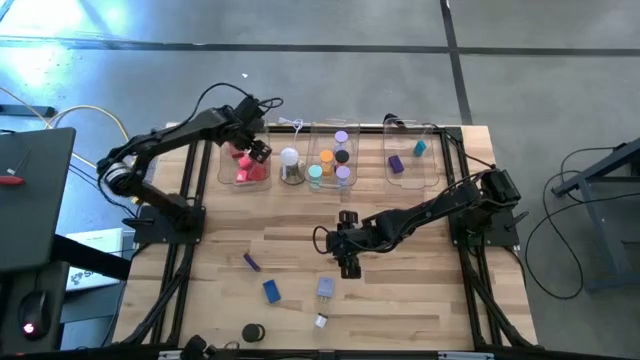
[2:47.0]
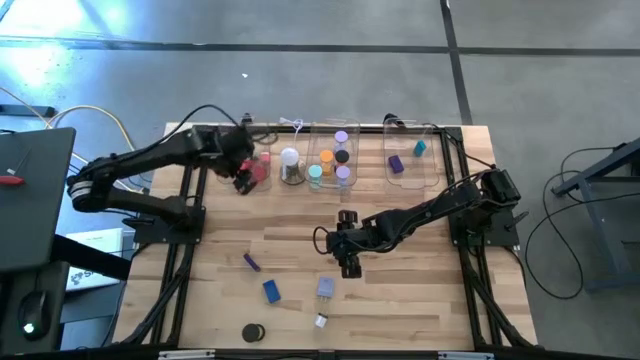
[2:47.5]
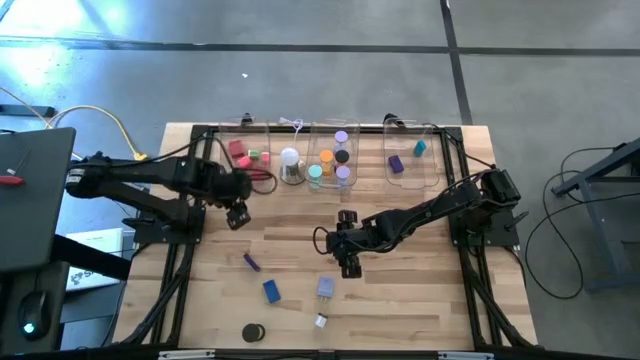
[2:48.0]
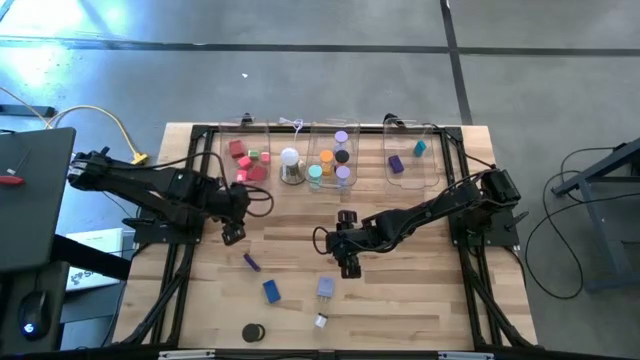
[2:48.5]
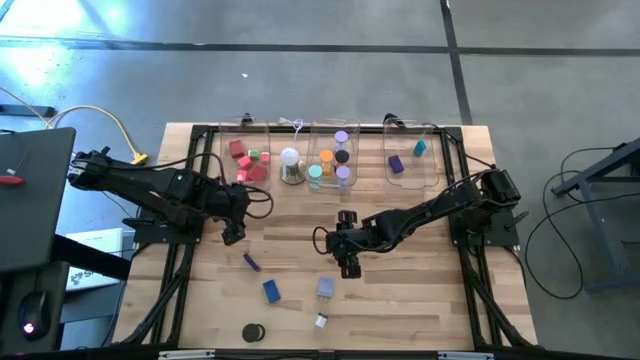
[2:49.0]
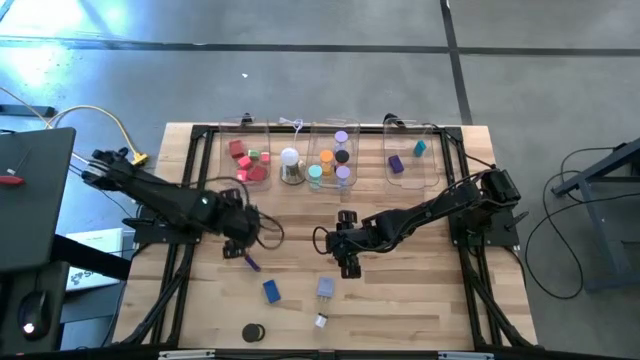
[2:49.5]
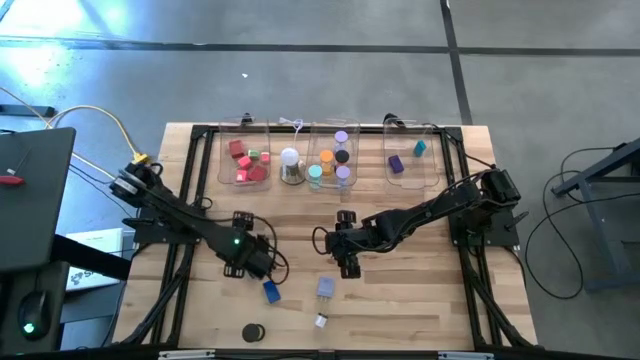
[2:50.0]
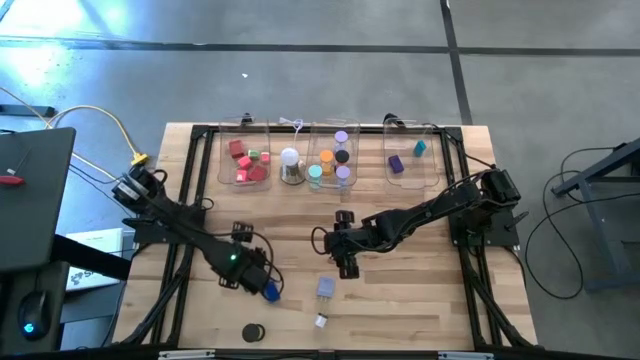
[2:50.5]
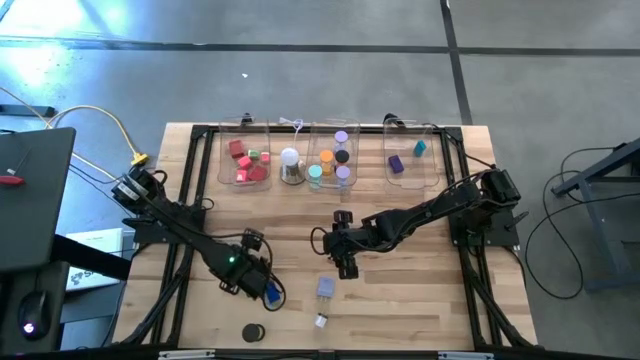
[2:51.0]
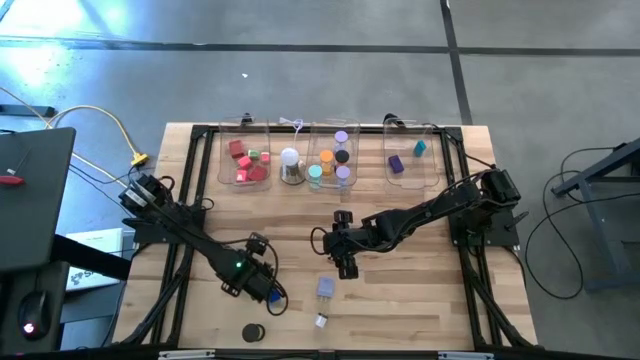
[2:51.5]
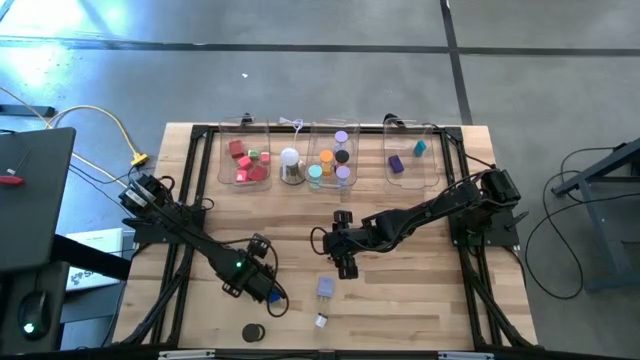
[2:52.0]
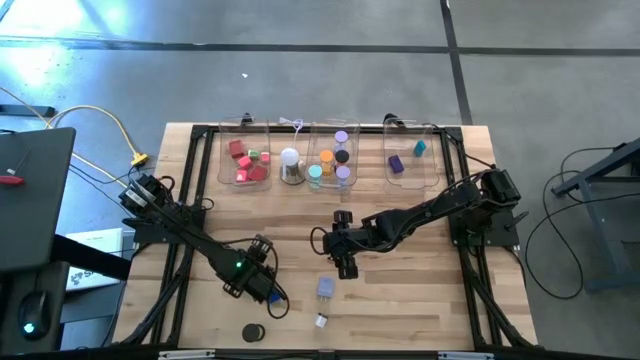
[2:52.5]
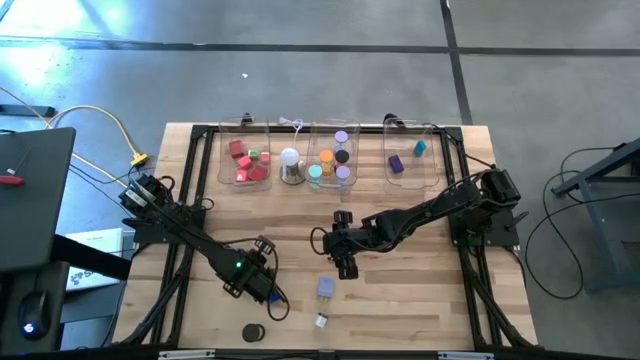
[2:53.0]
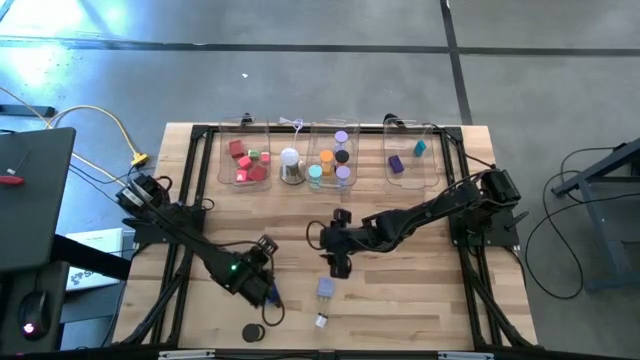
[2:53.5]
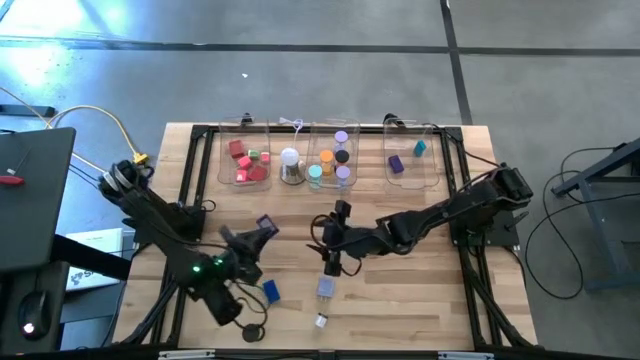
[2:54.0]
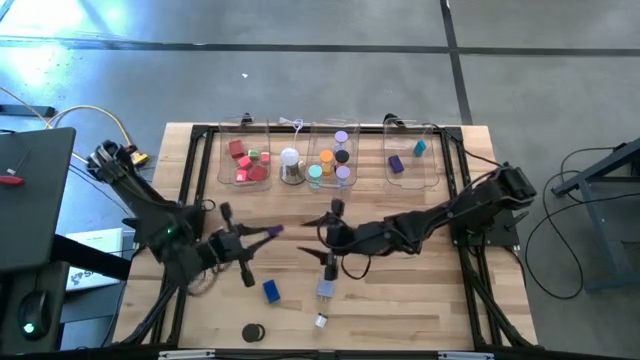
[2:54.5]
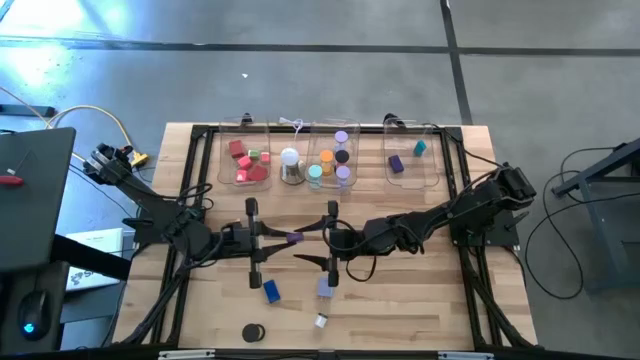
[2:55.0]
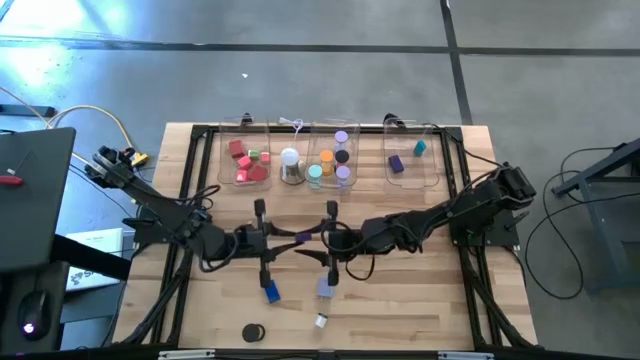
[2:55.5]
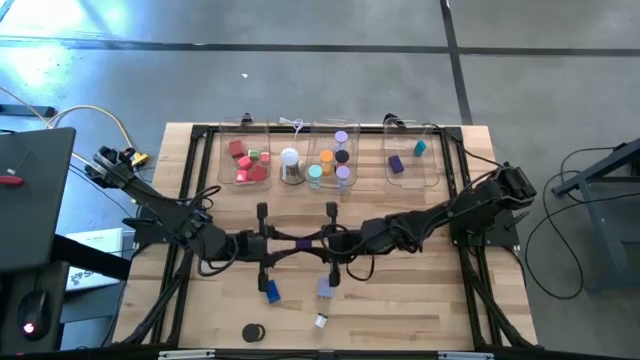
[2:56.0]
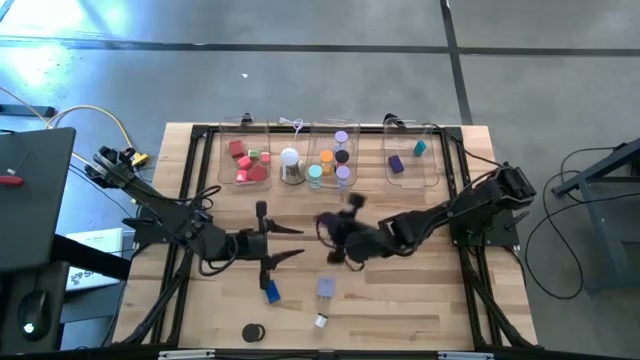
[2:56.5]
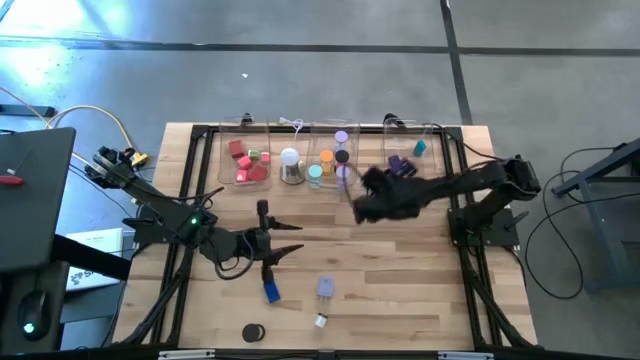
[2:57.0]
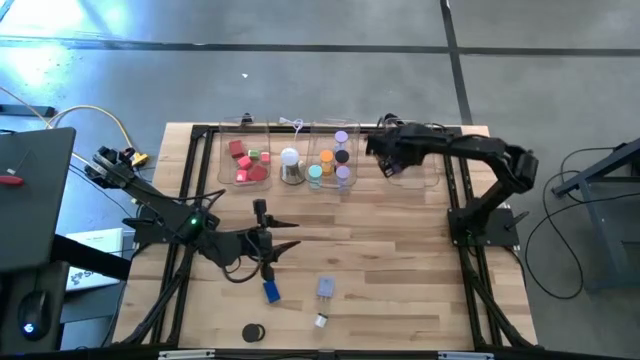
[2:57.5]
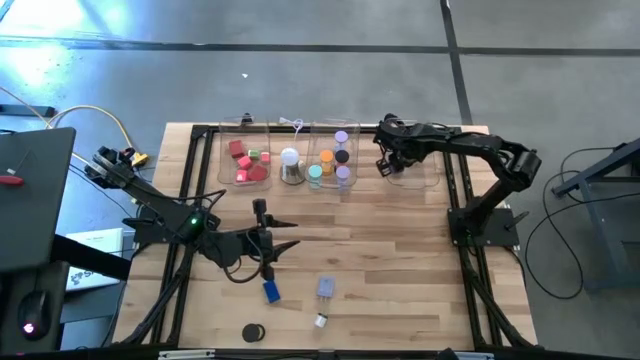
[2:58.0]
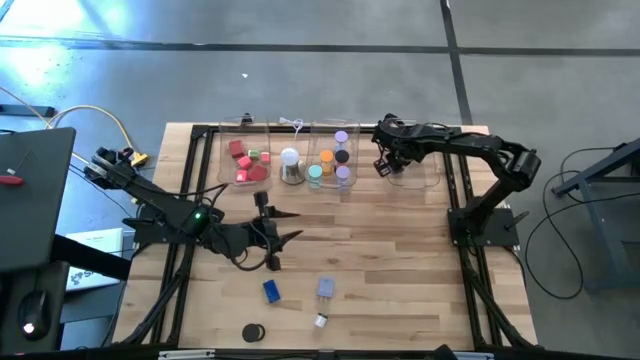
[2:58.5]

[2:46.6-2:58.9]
Task: Pick & Place Office items
Put the top blue digital clock into the right transparent bin

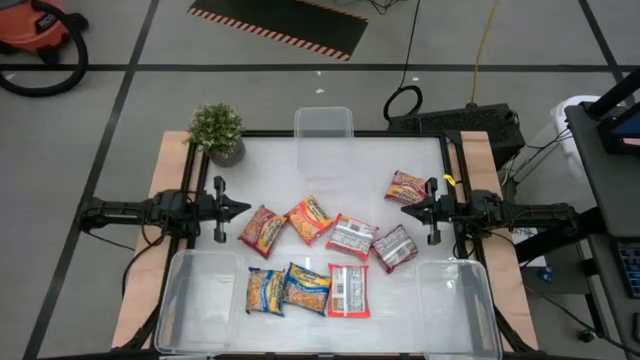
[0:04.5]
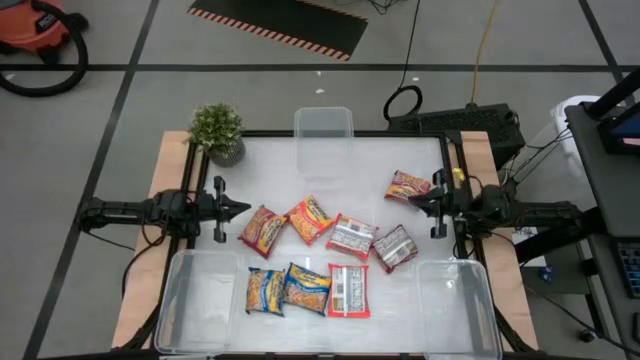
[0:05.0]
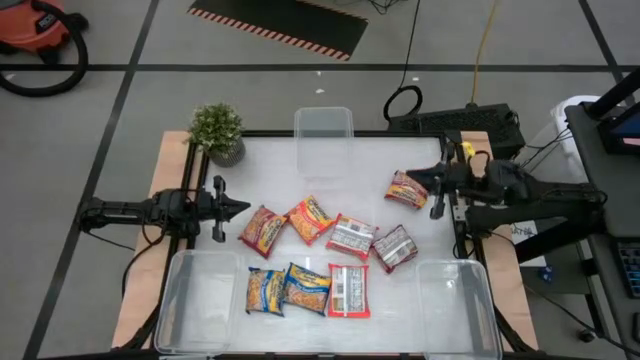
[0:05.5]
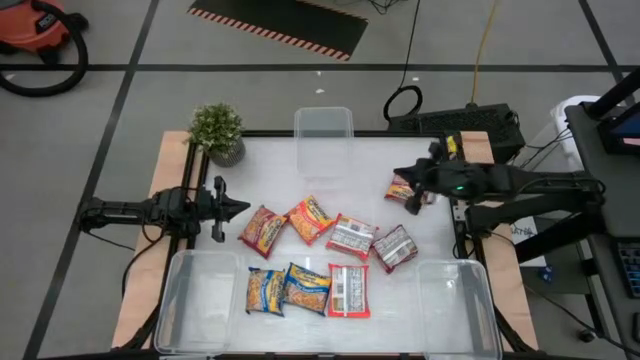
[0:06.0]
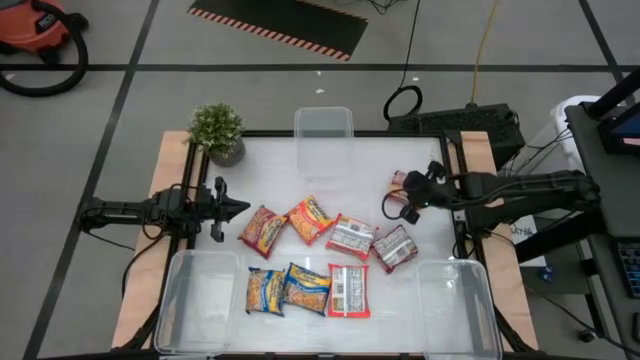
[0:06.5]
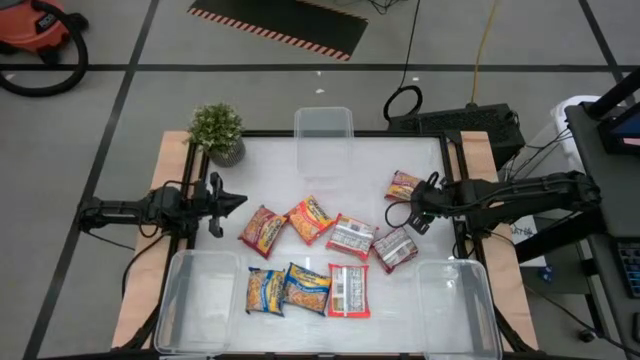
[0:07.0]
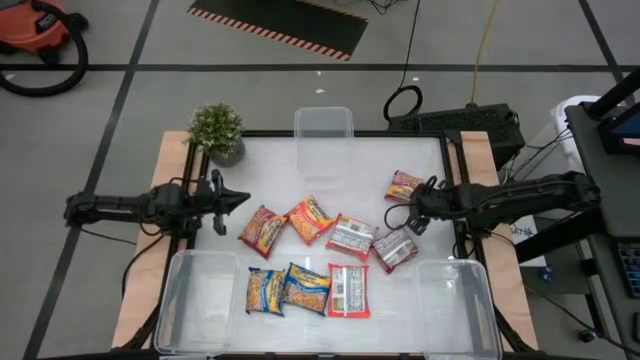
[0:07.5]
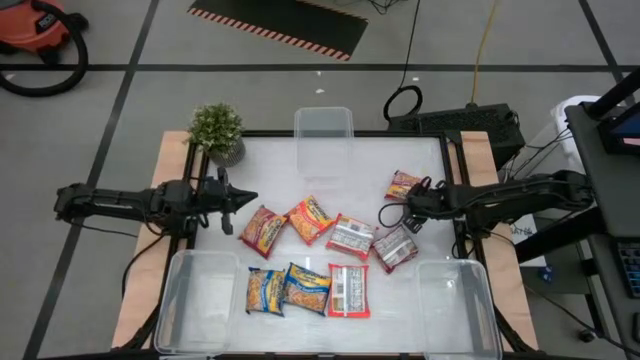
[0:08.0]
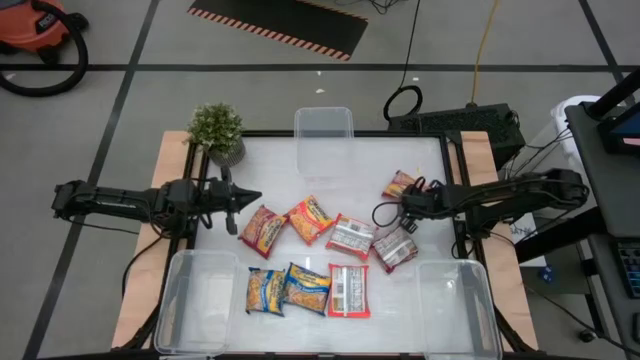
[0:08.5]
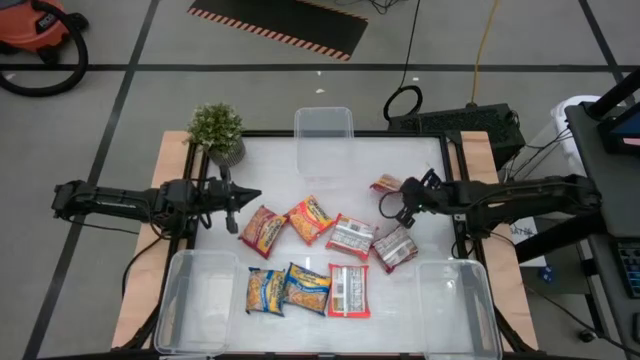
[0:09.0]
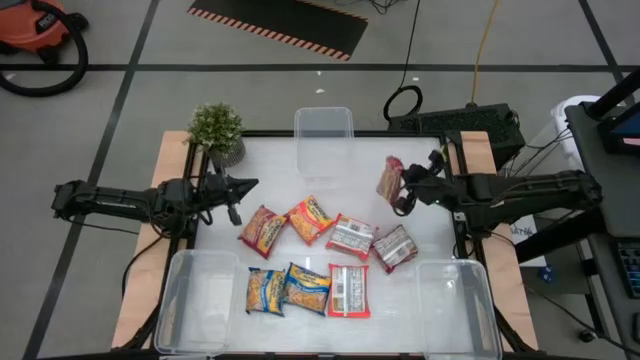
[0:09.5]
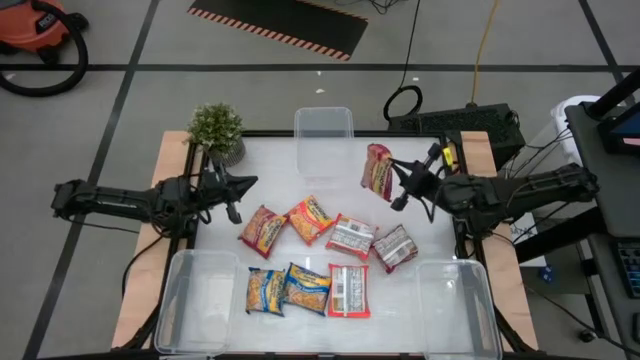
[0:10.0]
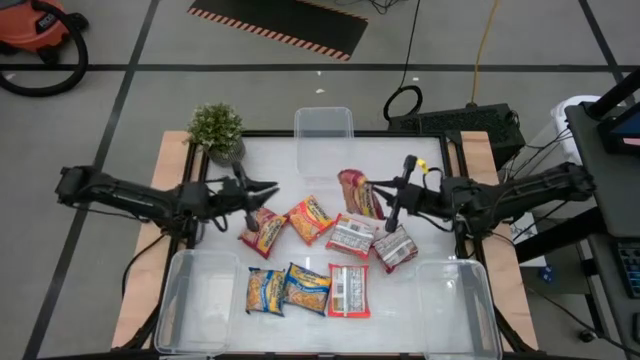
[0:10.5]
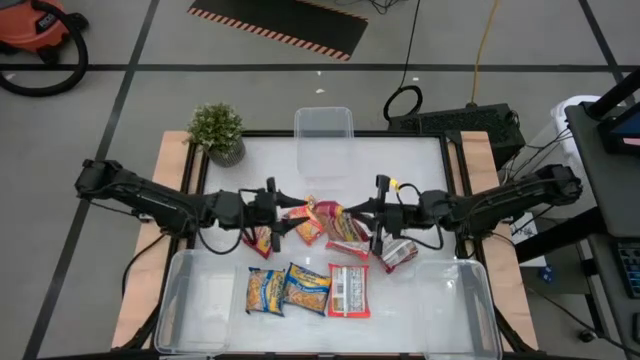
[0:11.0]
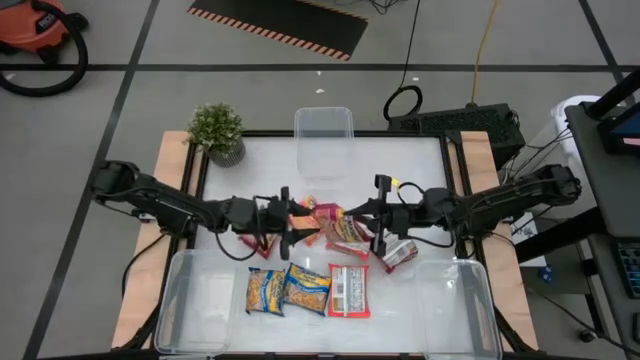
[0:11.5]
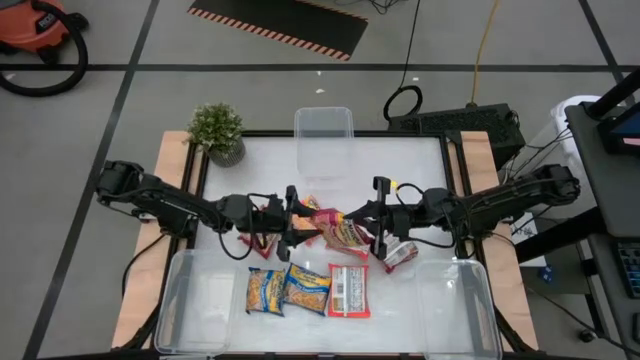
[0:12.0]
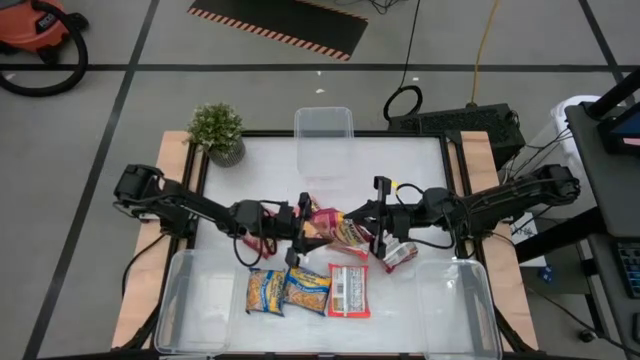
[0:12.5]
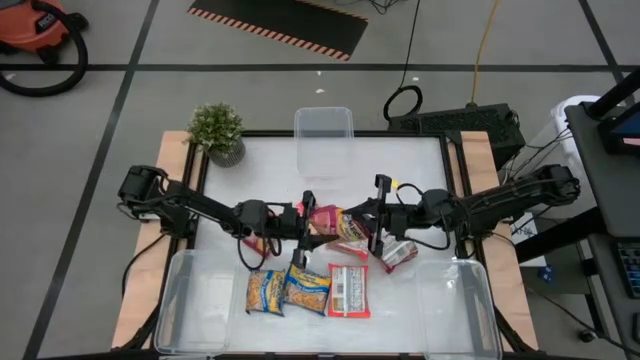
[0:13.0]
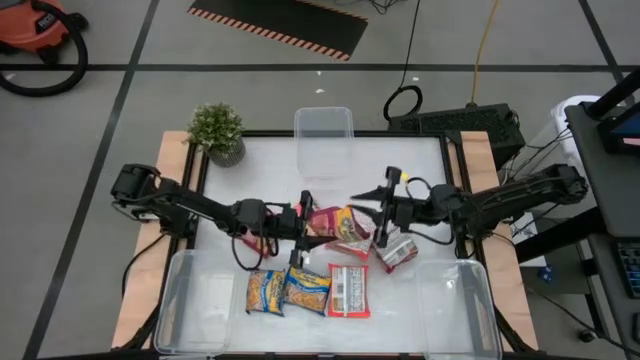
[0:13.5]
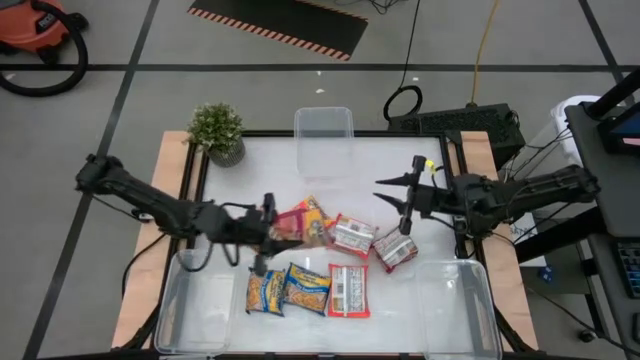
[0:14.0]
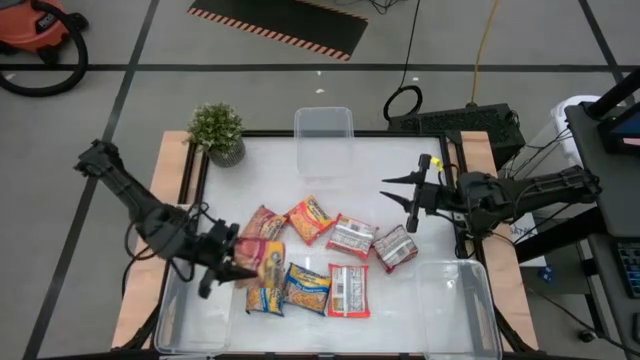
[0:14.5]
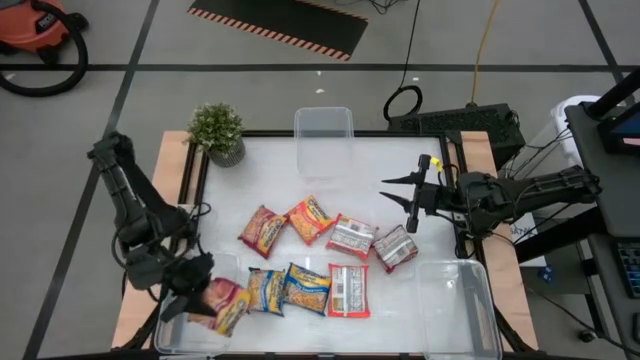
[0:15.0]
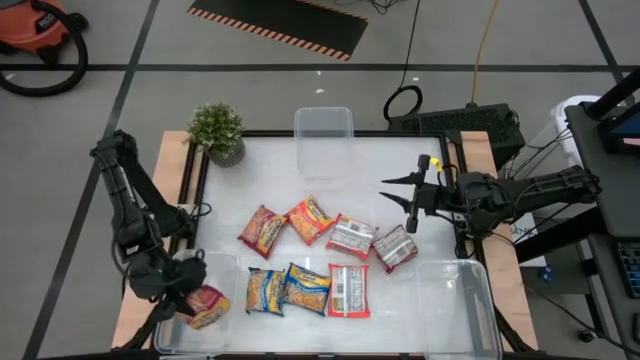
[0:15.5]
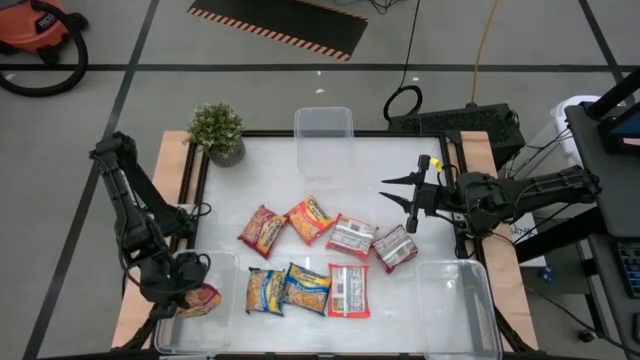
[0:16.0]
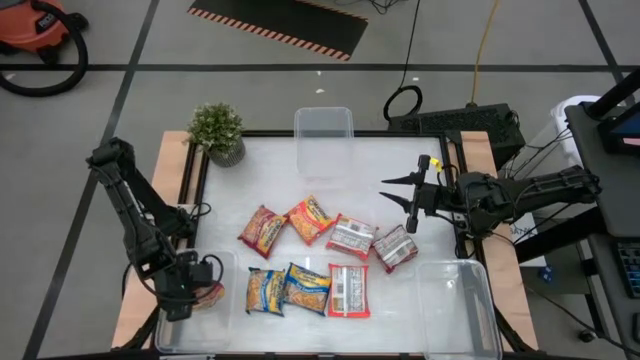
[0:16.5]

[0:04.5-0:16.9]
Task: Sort Maruchan noodles
Put the top red noodle pack into the bottom left transparent bin
